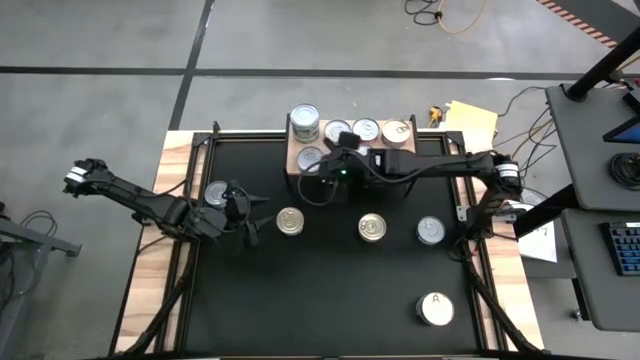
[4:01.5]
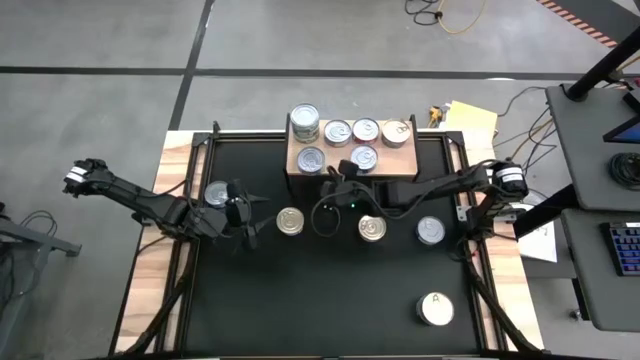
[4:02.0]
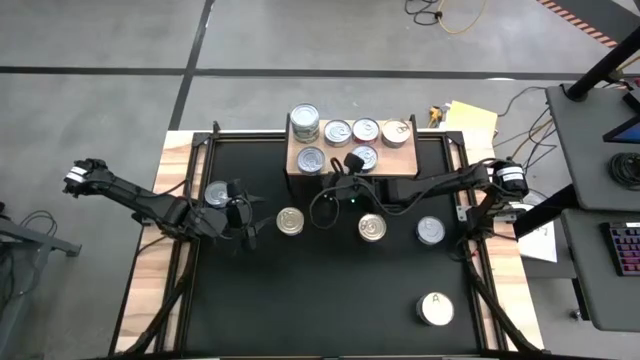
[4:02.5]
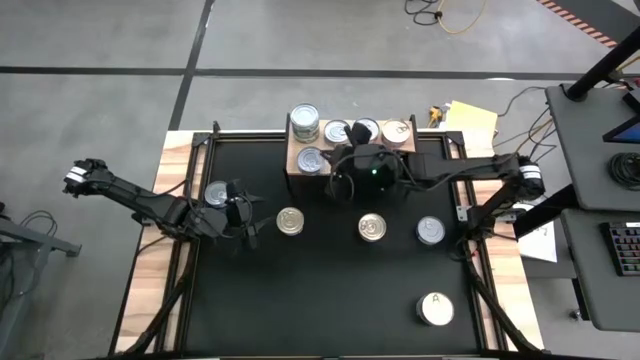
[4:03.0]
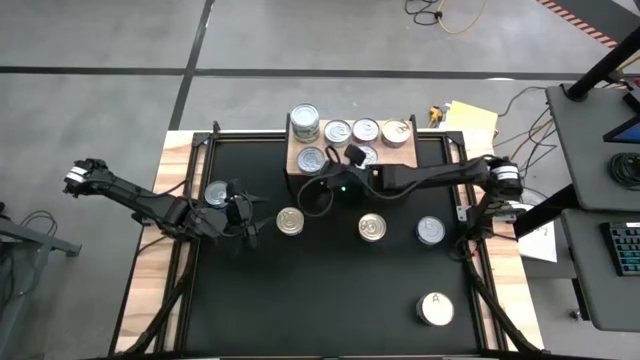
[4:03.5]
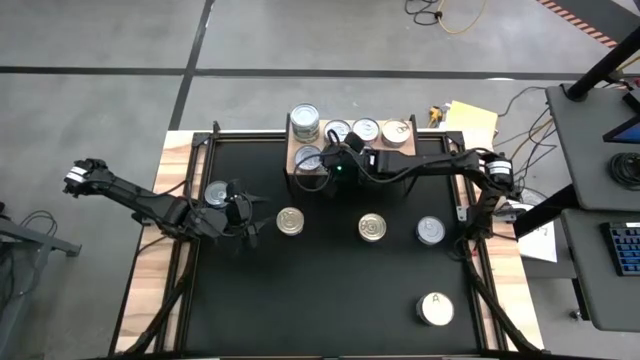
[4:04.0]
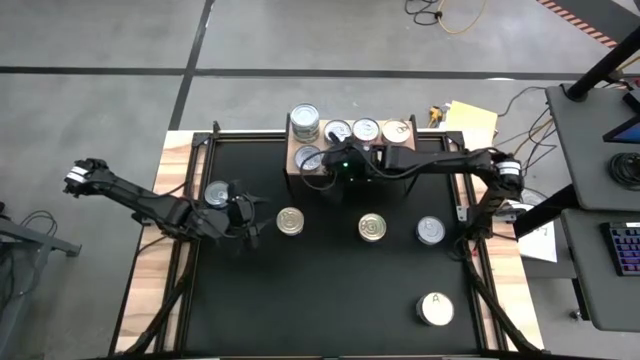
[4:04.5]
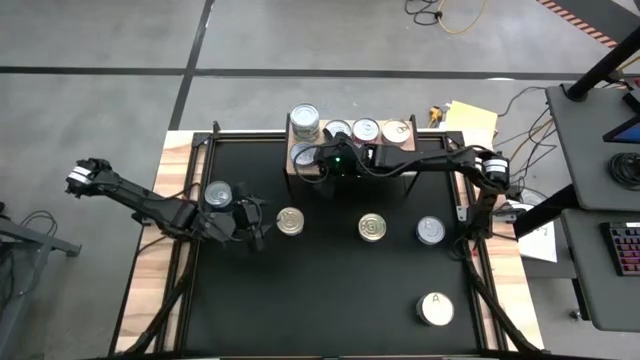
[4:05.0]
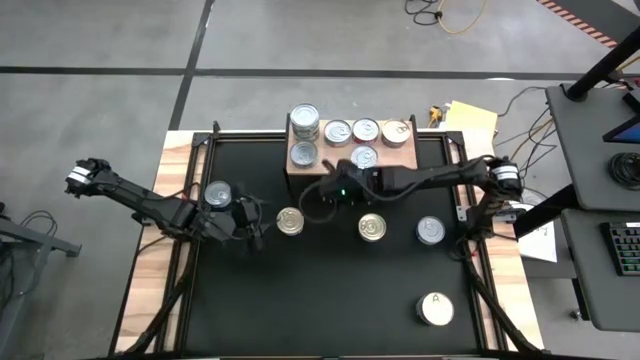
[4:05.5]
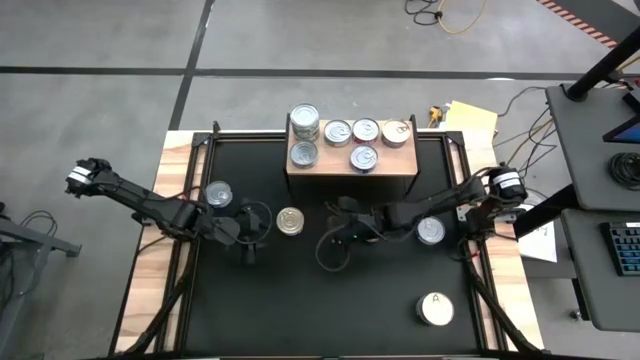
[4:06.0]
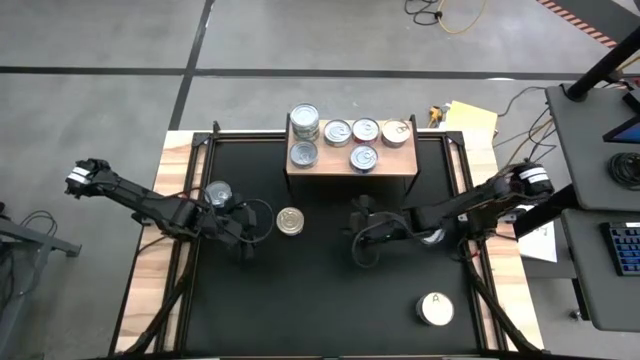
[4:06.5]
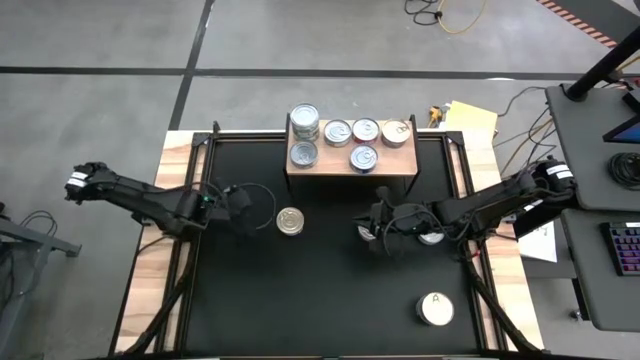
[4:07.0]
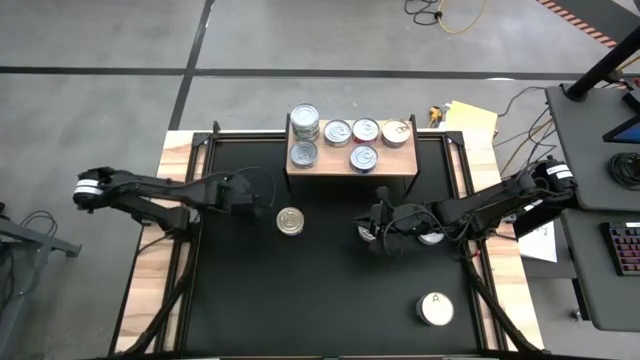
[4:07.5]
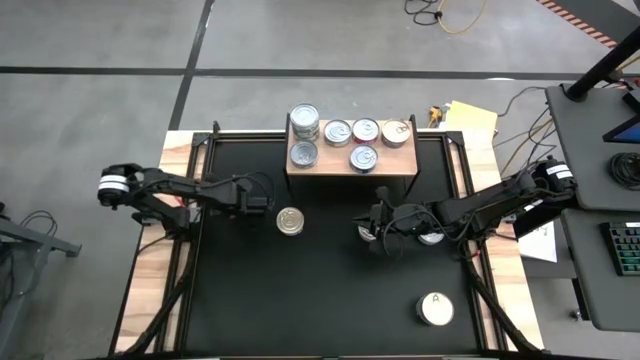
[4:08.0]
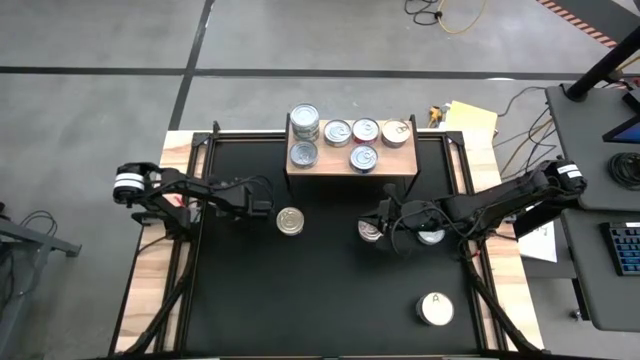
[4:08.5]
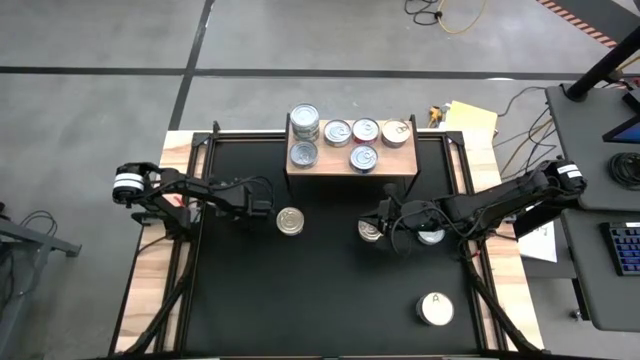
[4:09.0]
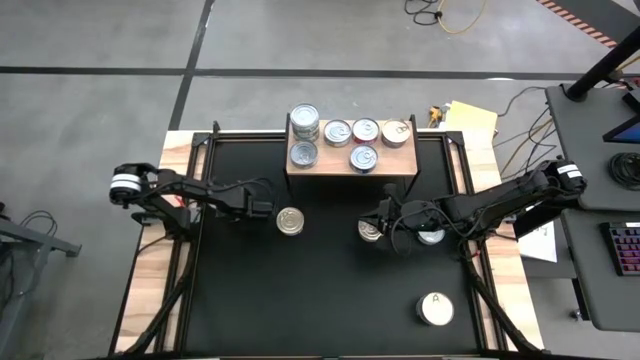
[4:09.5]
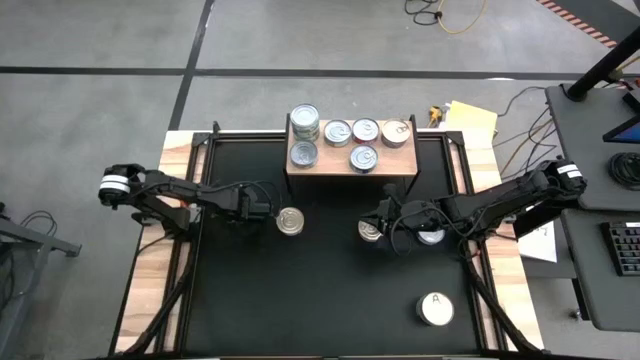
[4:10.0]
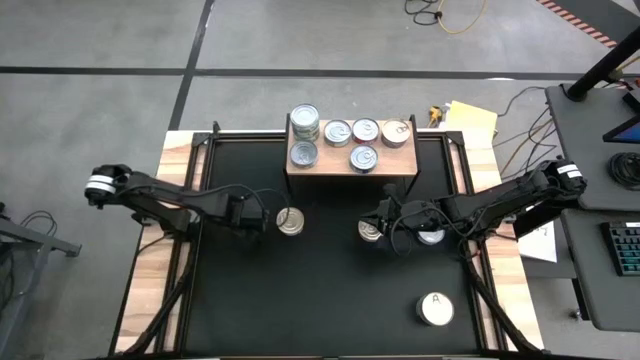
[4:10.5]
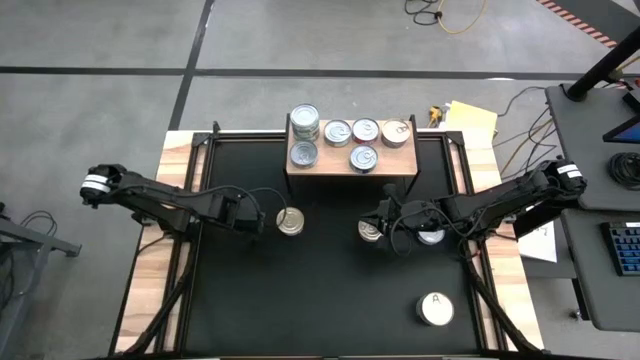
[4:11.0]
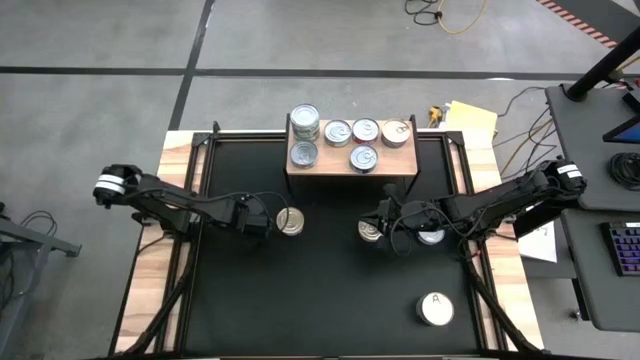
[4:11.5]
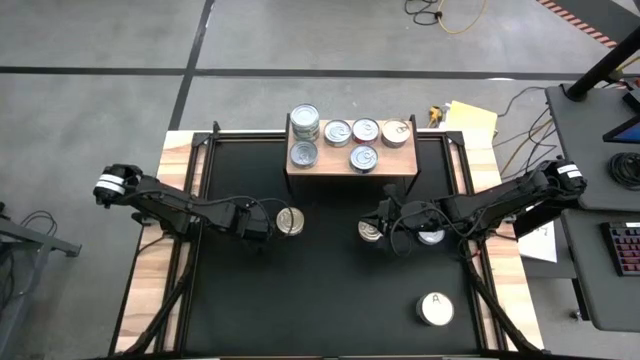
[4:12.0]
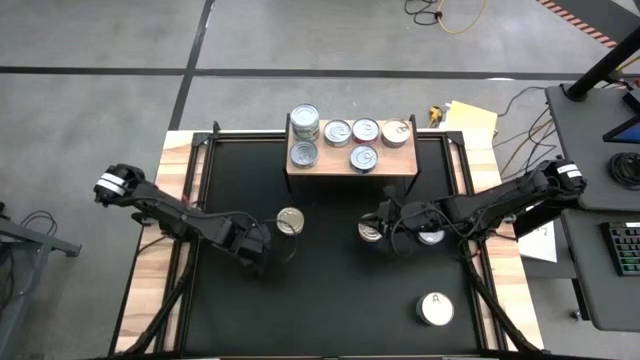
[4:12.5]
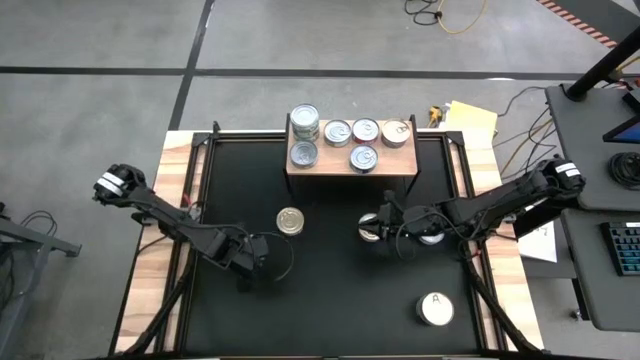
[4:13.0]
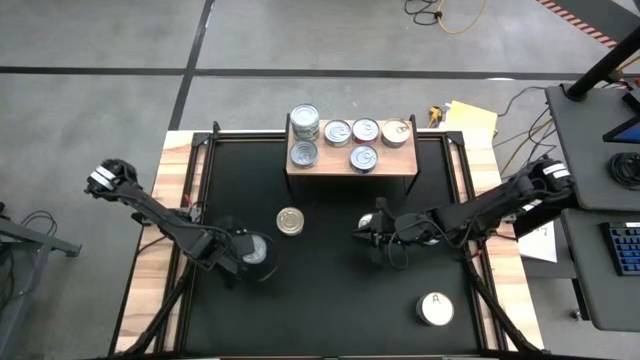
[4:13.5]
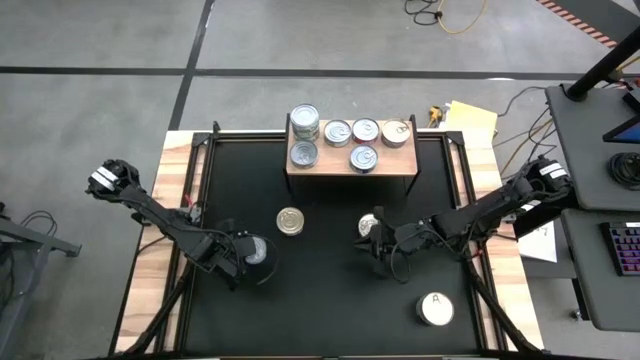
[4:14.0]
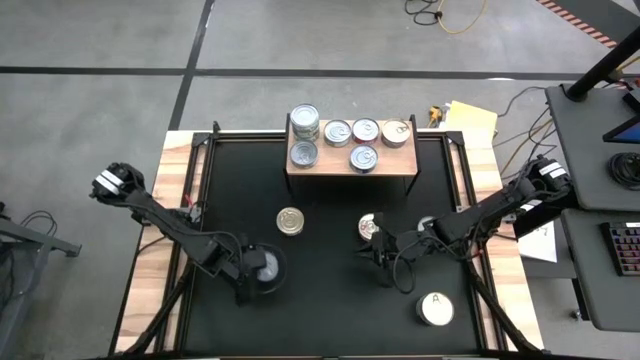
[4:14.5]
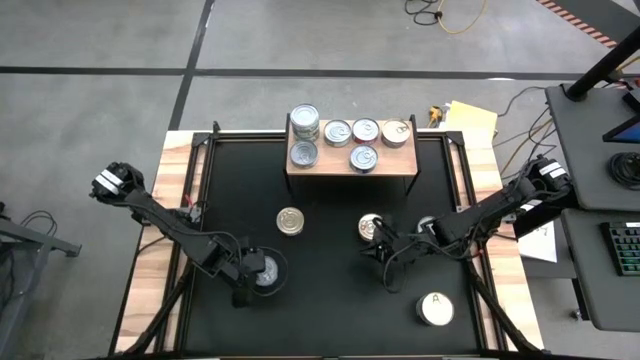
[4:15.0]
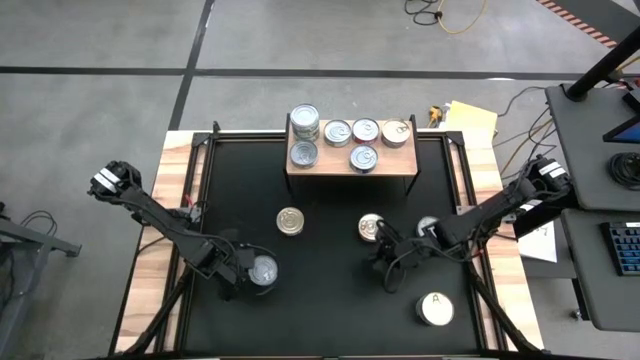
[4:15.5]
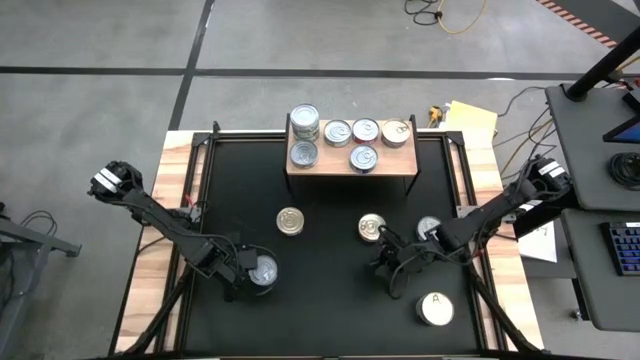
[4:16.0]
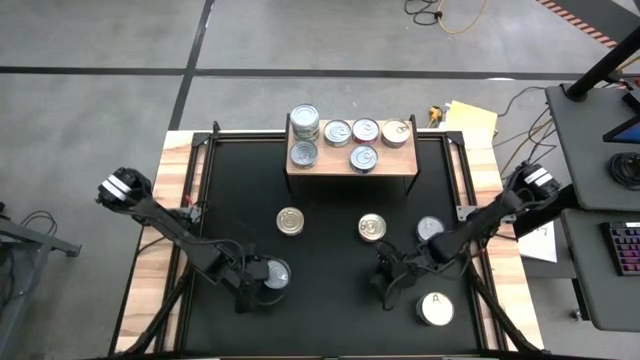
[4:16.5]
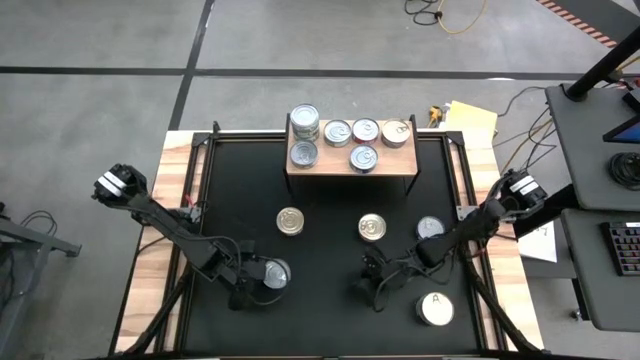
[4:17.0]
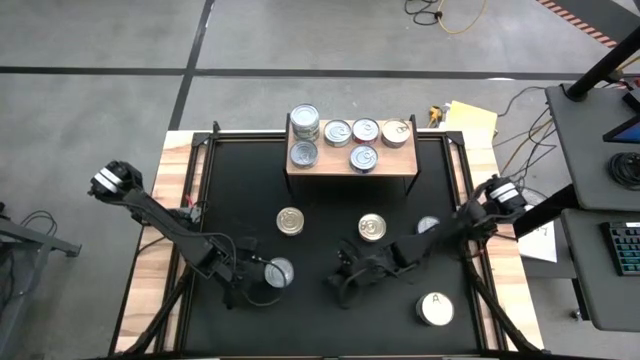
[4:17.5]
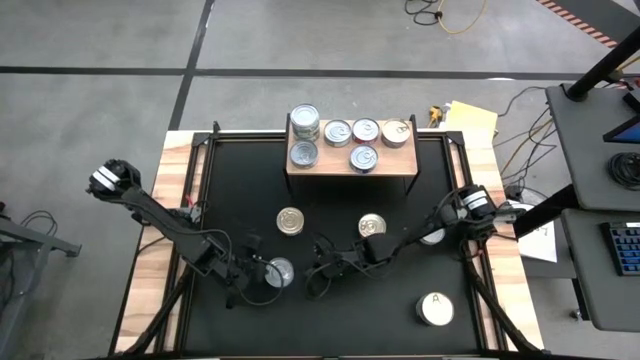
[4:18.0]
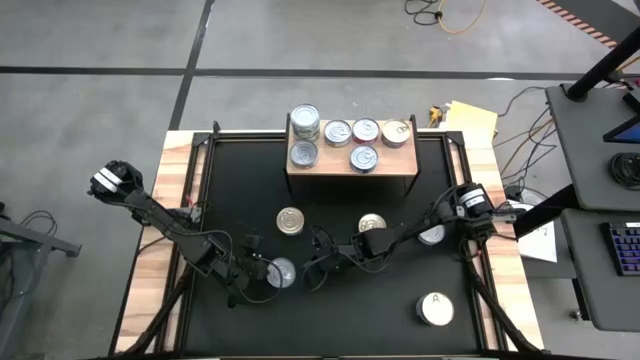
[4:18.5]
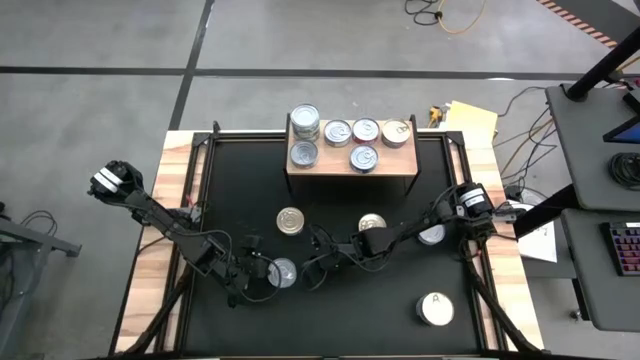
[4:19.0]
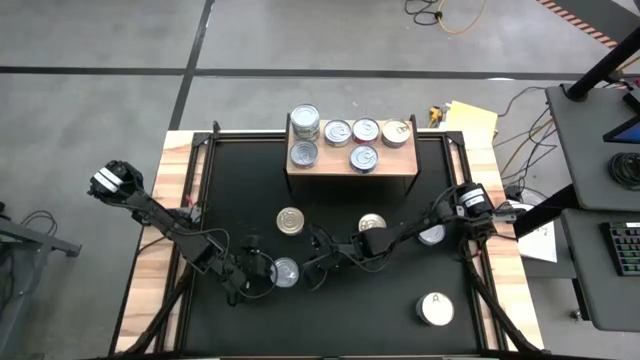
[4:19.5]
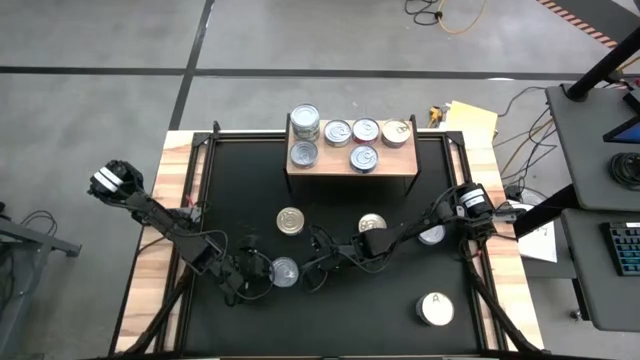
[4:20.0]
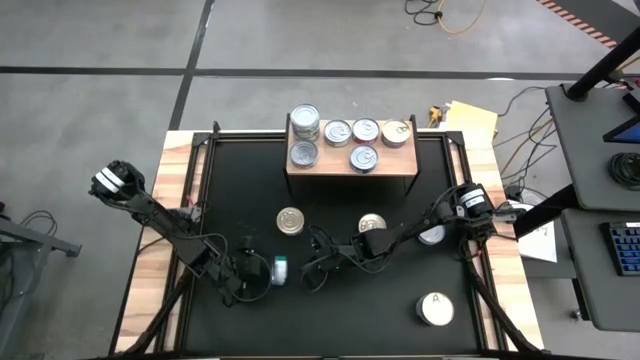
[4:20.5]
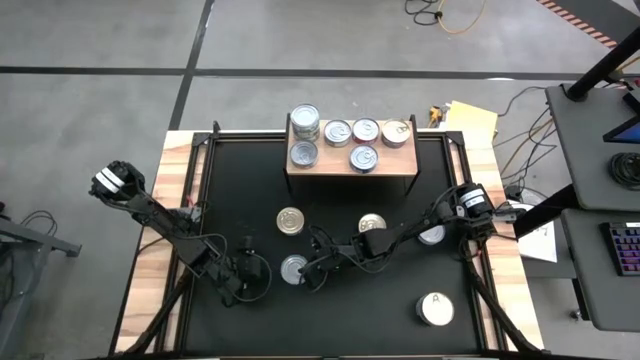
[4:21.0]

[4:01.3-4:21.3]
Task: Stack canned seafood by type on shelf
Put the green blue tuna can on the shelf

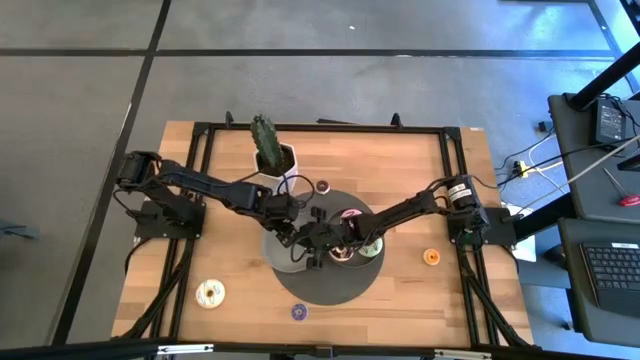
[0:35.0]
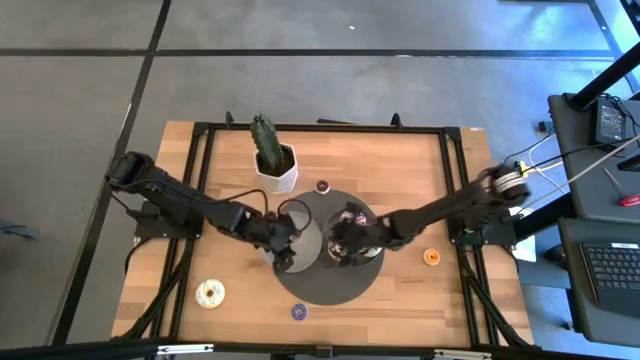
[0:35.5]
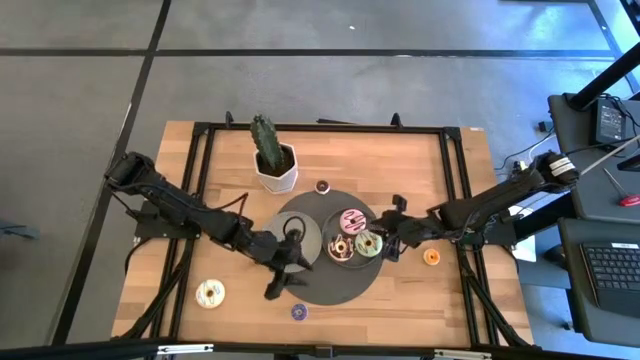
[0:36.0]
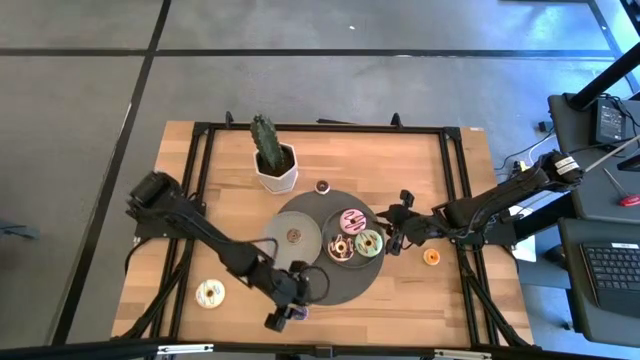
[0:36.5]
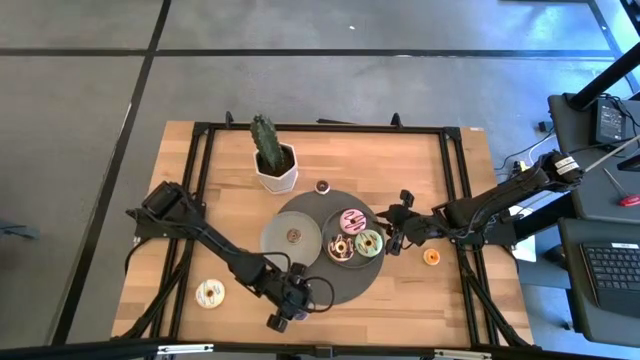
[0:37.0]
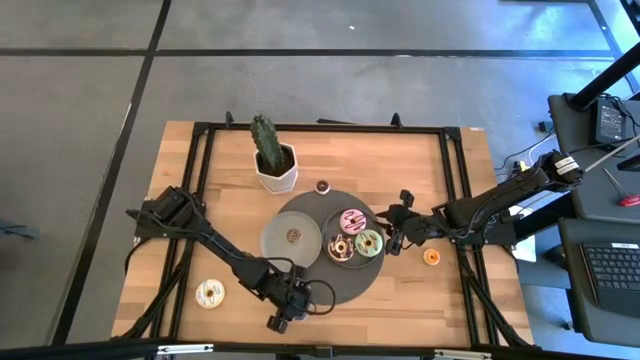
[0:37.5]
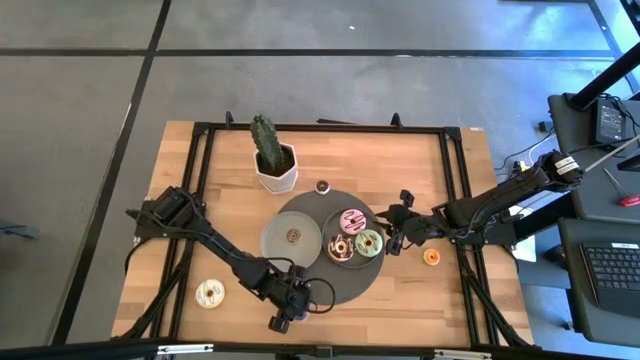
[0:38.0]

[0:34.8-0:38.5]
Task: Pick & Place donuts
Put the small blue donut on the gray plate
